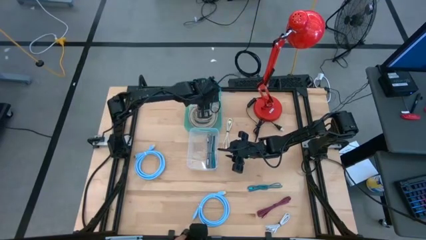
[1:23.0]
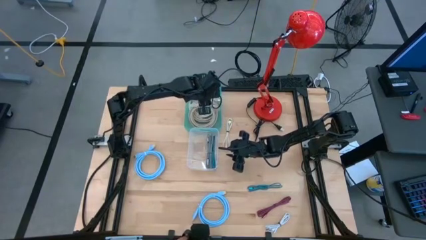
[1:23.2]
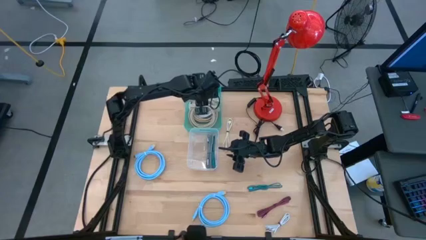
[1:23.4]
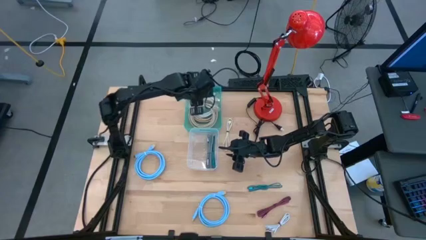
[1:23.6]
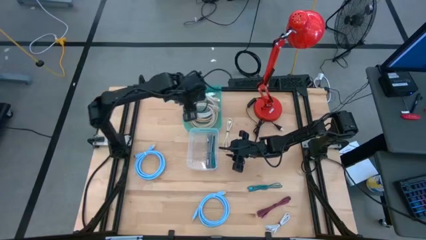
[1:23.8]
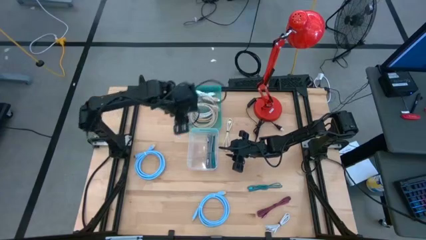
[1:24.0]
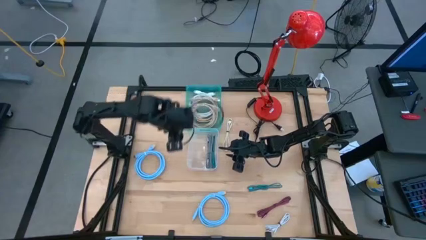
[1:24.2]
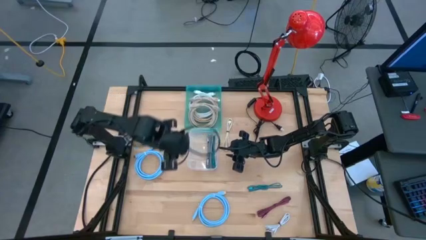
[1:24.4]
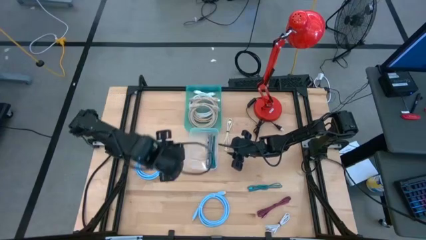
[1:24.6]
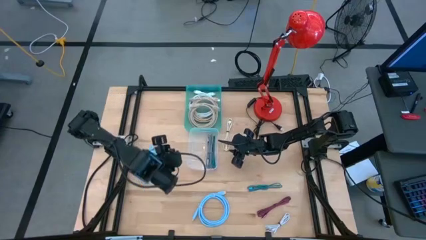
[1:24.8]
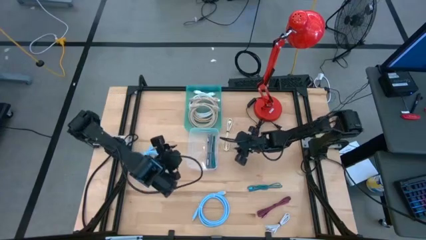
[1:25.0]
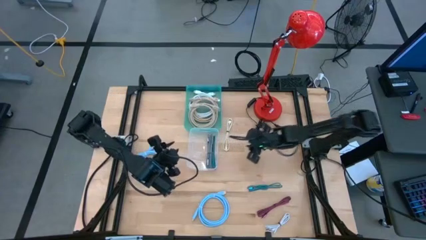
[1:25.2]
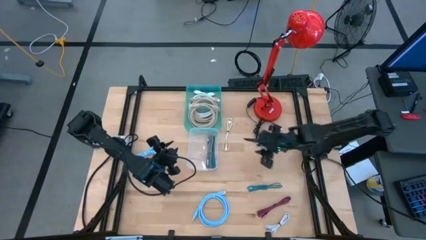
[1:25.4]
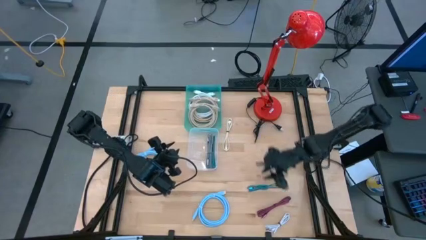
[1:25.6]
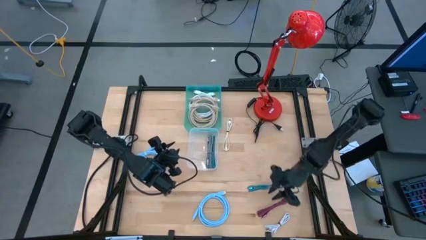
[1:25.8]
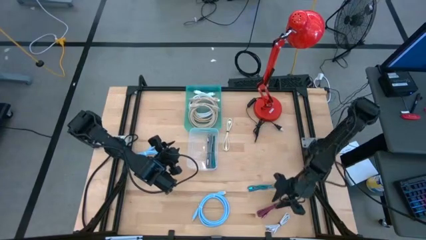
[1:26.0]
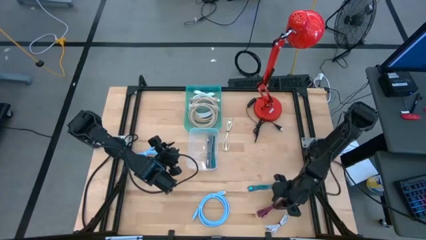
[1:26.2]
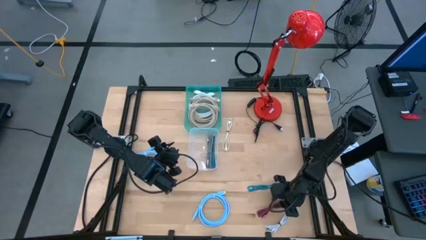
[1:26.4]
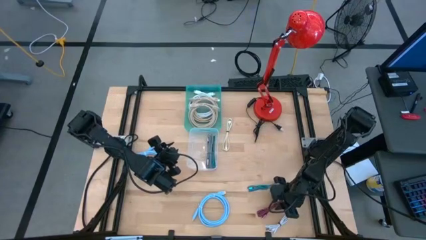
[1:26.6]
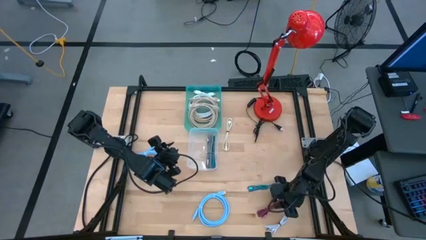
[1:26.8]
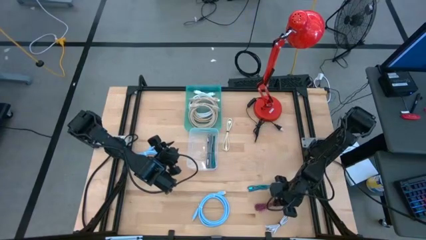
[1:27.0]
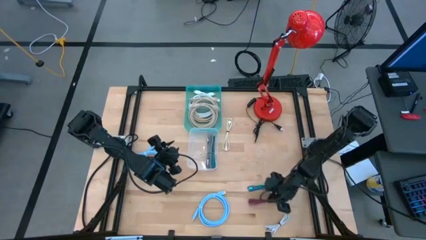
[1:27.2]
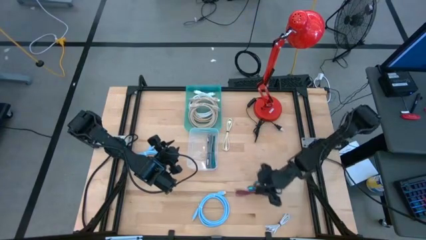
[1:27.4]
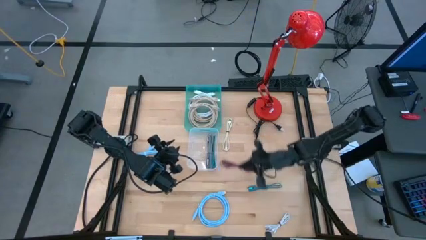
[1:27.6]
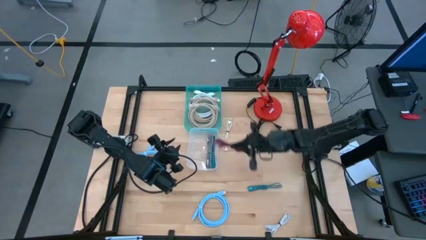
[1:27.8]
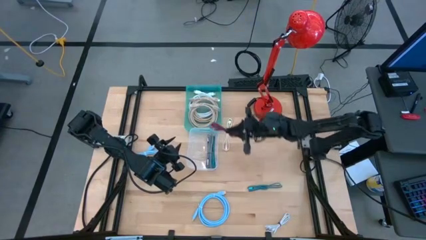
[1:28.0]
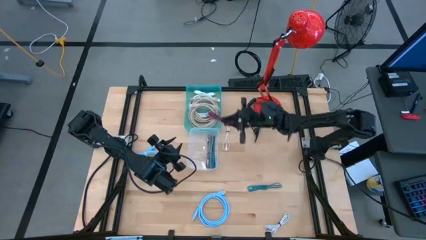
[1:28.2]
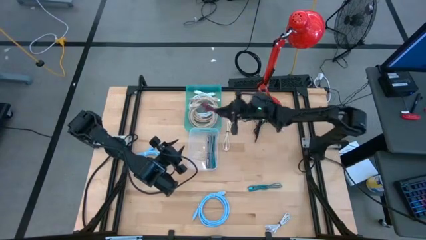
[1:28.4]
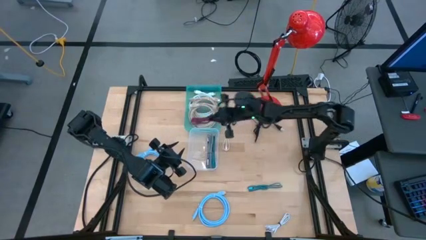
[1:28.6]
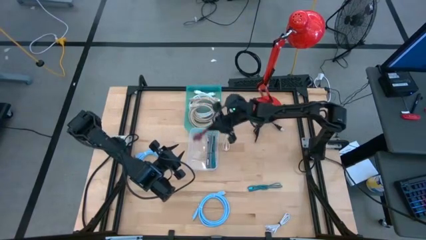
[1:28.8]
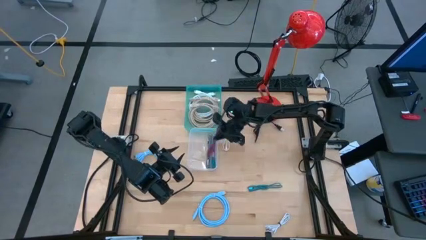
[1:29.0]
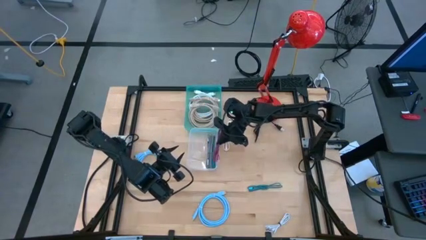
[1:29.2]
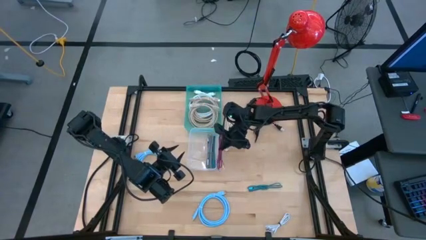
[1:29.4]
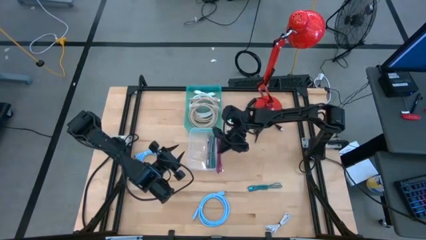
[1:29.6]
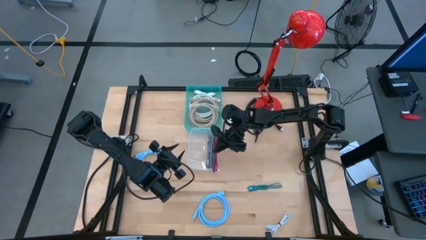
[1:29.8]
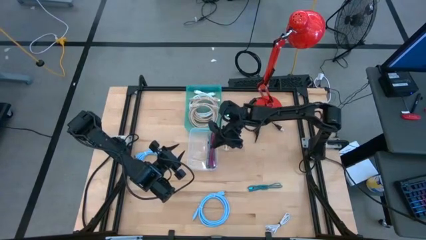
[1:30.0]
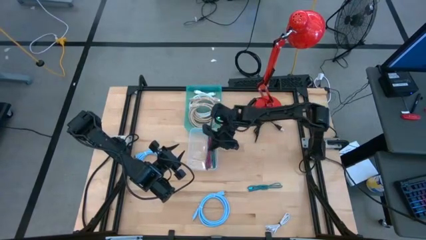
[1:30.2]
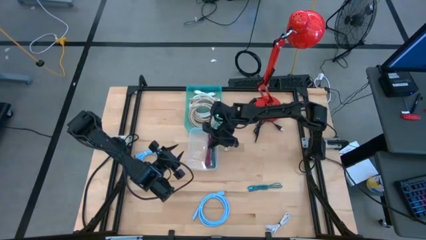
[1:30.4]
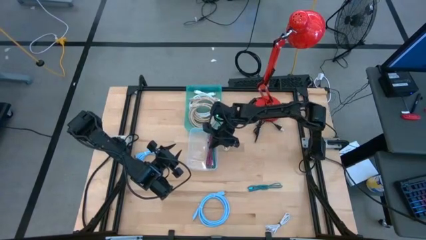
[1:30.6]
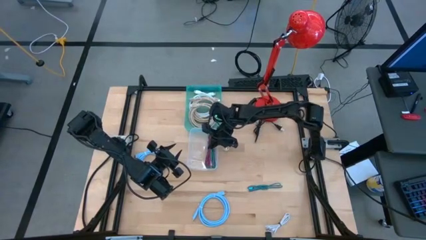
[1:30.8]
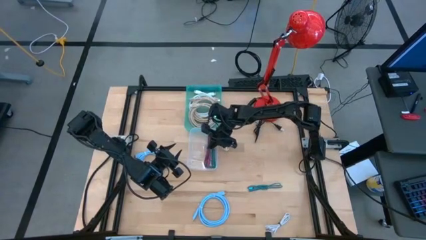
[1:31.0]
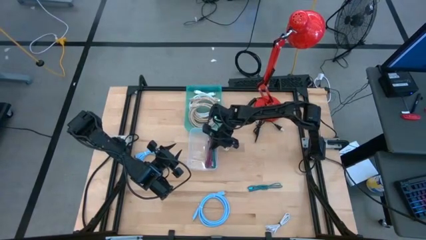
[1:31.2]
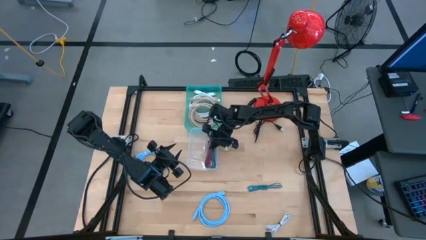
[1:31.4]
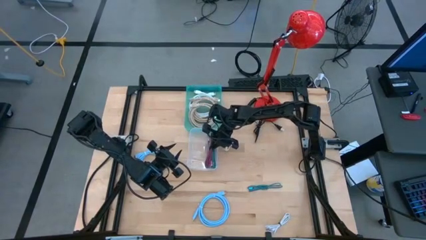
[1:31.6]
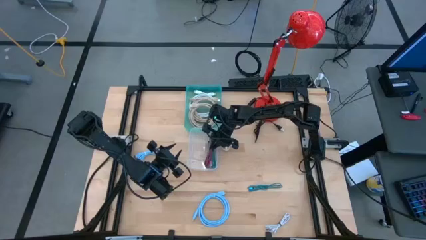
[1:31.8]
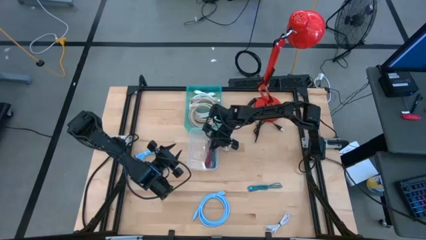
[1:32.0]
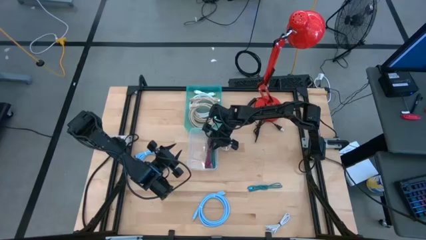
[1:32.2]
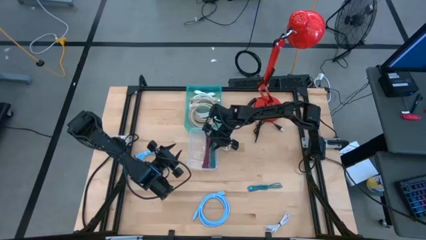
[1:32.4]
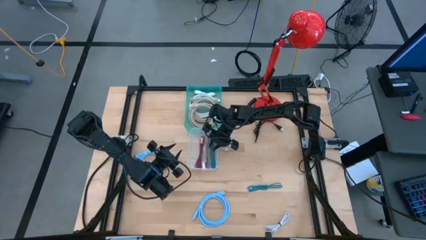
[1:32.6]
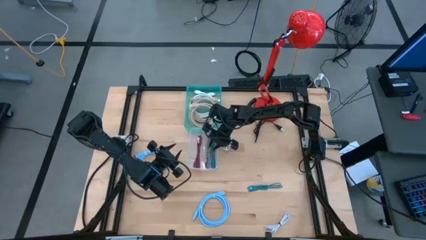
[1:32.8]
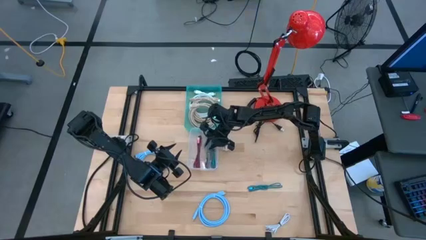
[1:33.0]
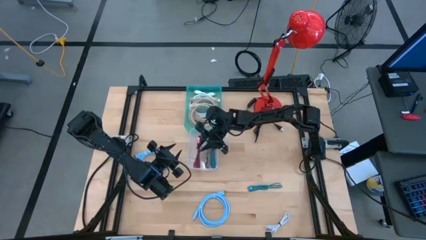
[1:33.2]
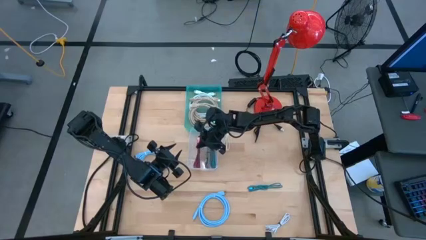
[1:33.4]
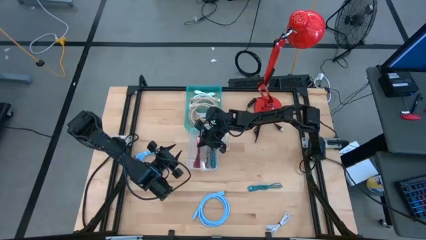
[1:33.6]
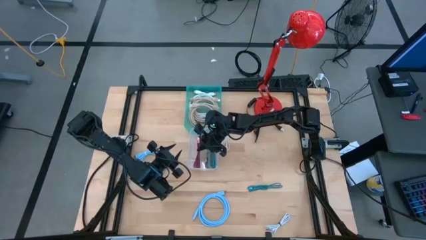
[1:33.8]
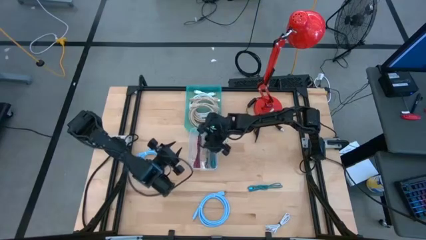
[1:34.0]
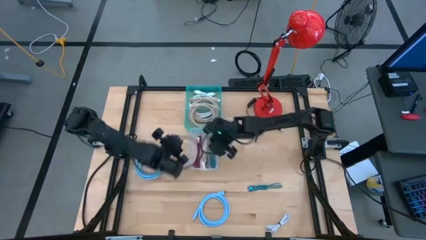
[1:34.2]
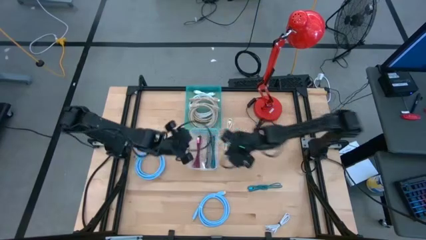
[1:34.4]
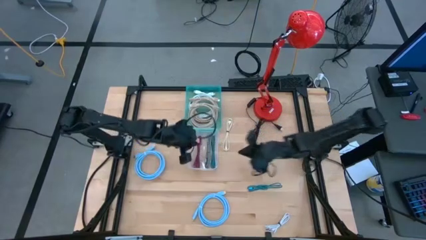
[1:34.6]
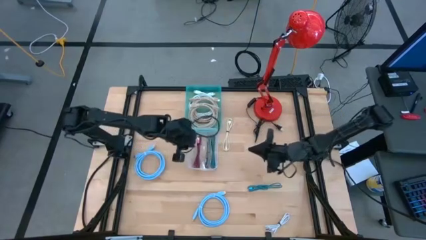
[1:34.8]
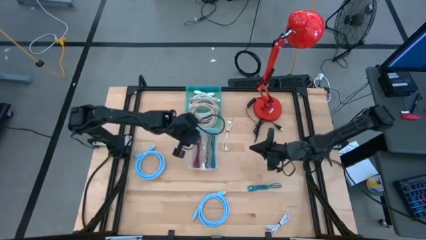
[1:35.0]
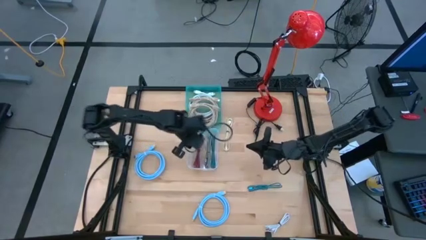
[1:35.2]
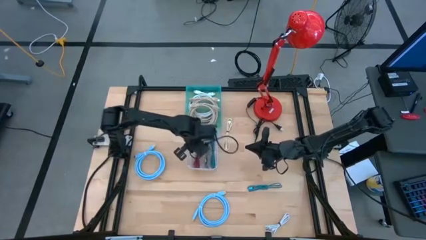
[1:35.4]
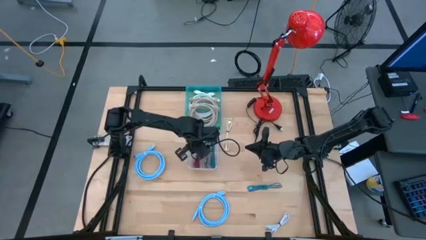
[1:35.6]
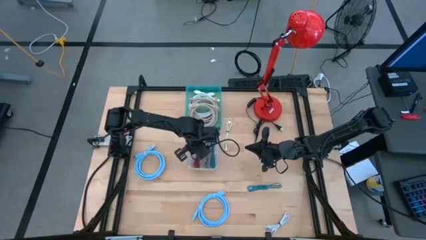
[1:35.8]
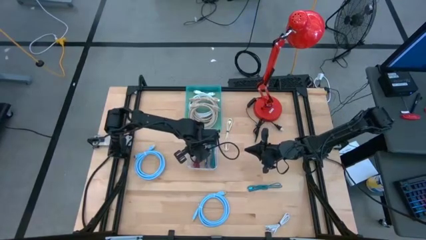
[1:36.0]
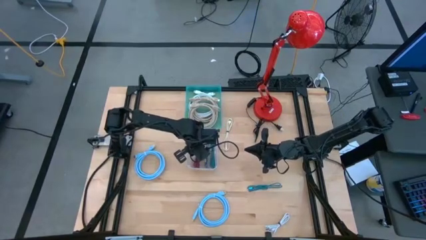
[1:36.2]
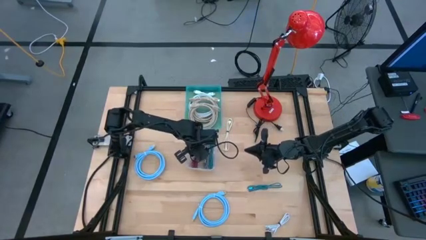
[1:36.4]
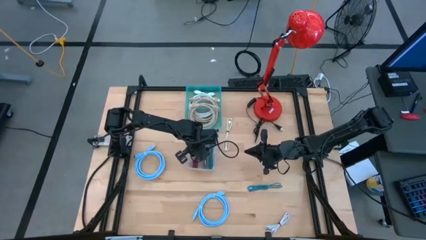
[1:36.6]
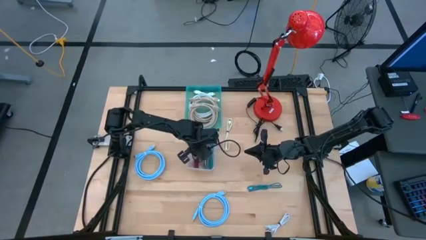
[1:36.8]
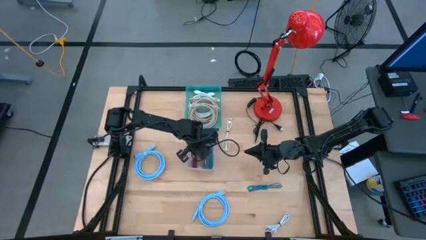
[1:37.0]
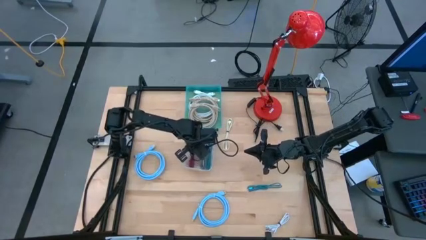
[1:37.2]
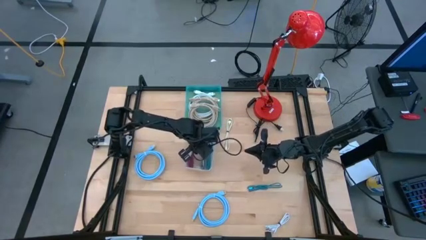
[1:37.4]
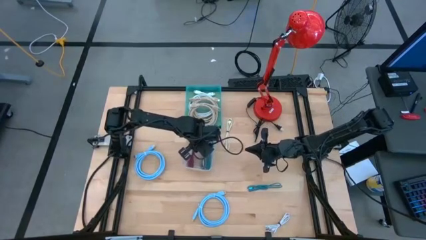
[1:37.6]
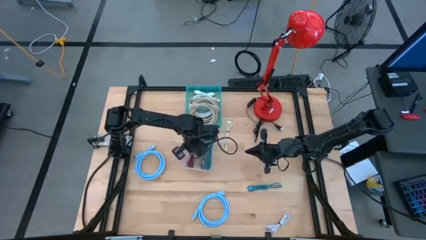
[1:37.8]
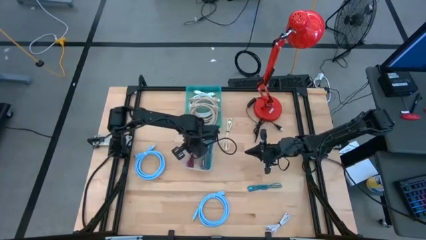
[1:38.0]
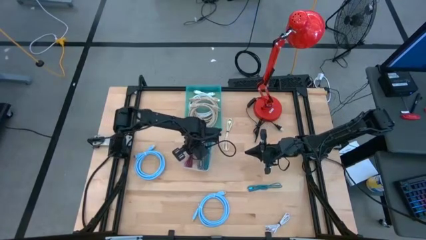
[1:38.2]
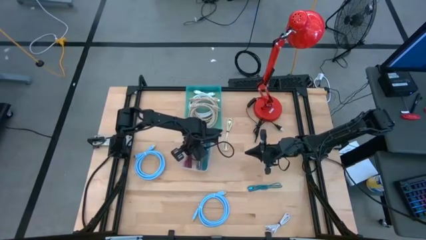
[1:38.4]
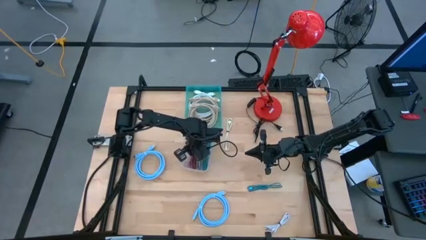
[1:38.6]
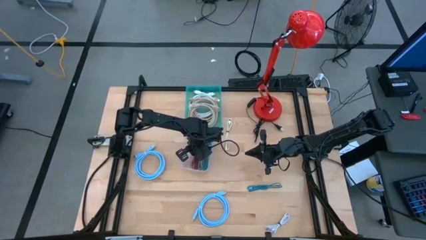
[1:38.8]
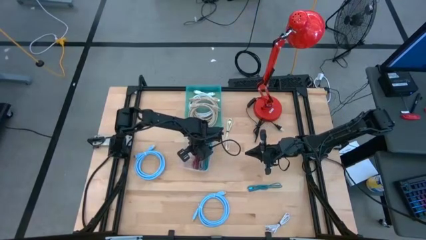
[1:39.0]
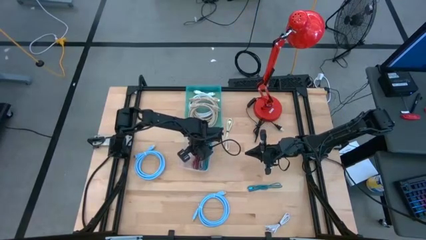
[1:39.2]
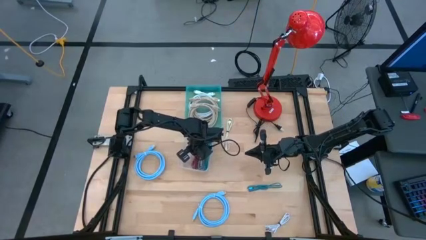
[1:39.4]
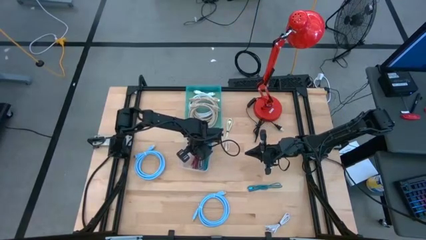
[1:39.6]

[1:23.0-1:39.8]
Task: Pick & Place USB Port
Put the pink black tied USB cable into the transparent bin
